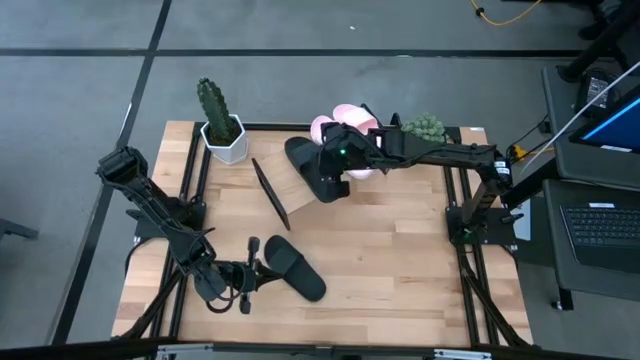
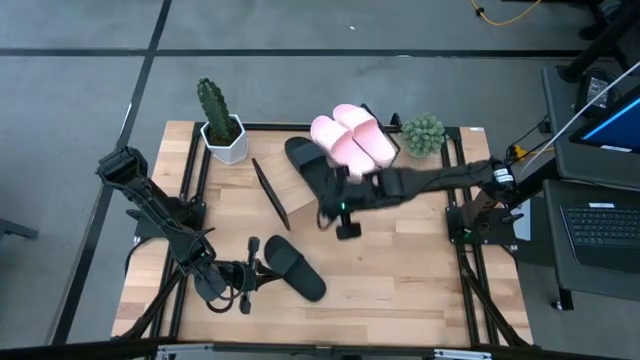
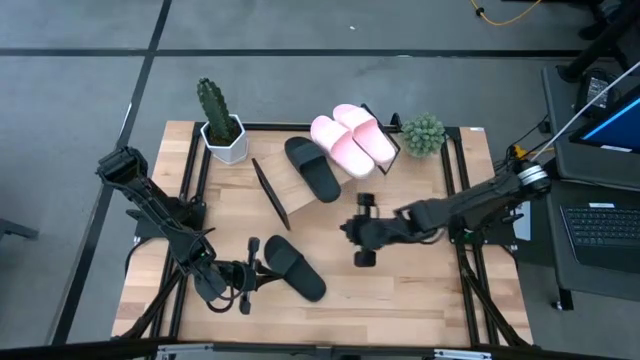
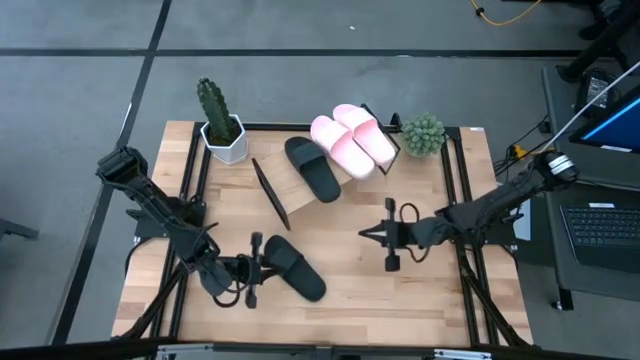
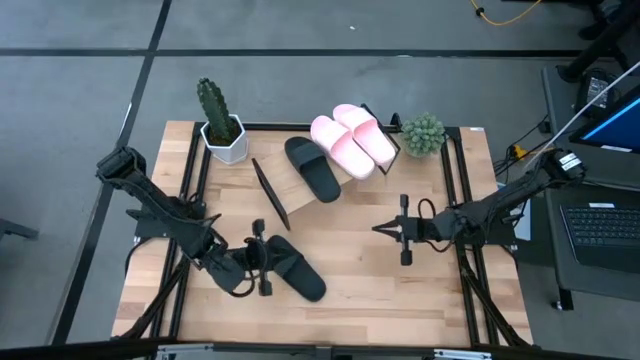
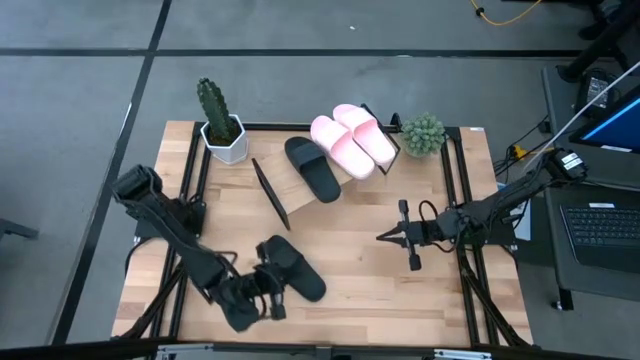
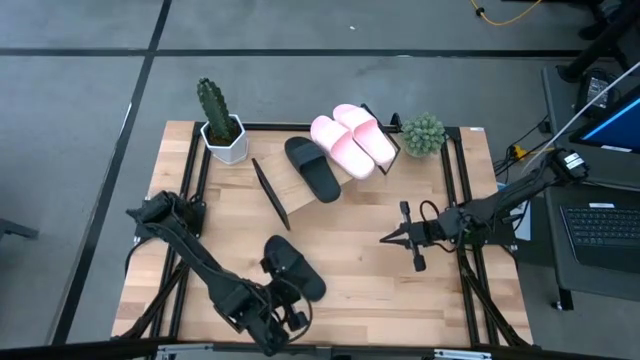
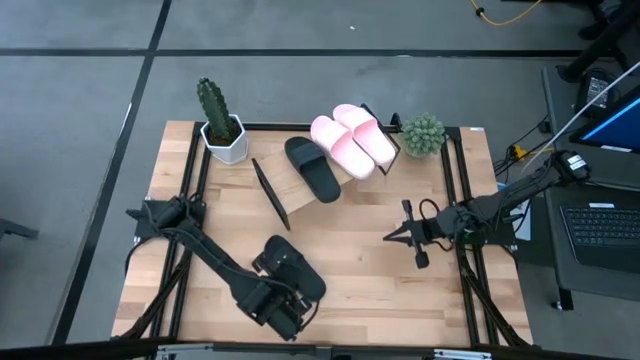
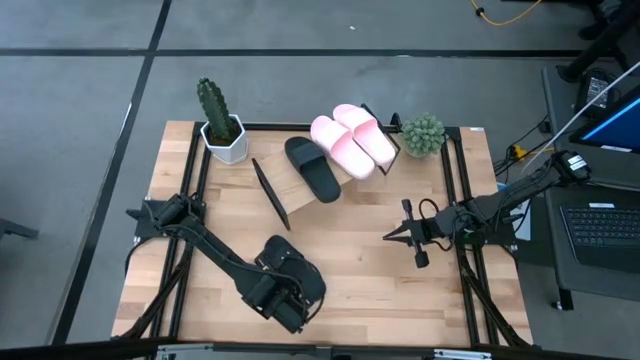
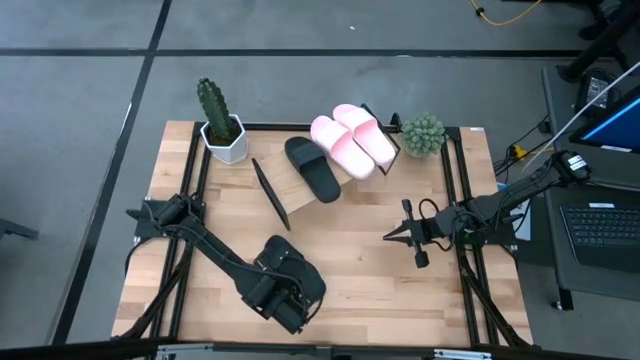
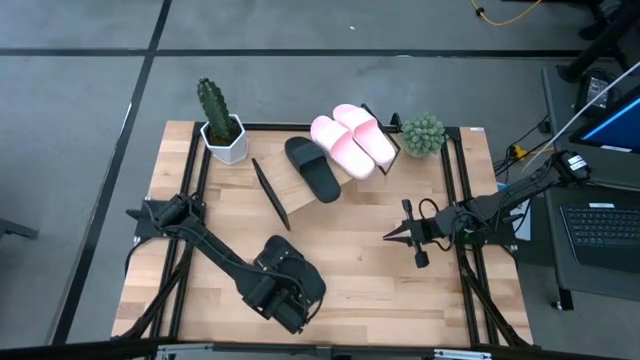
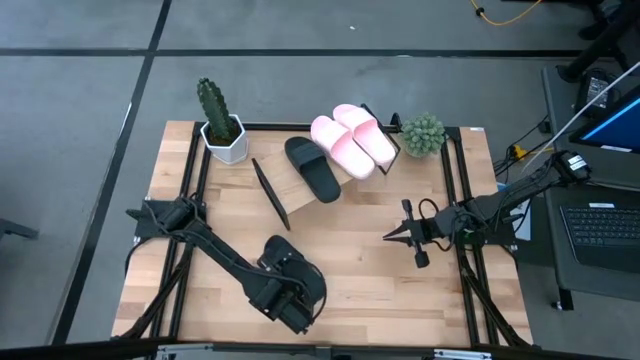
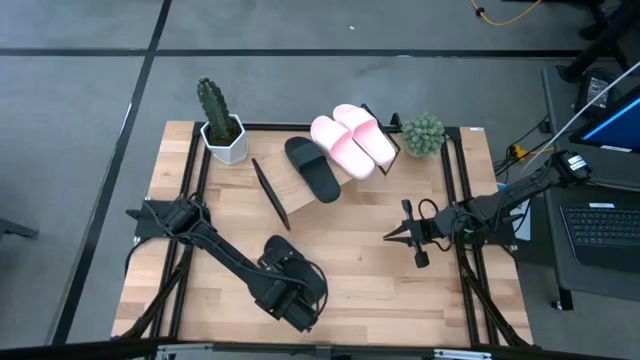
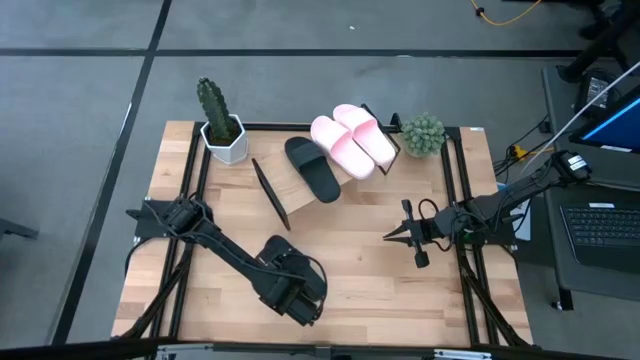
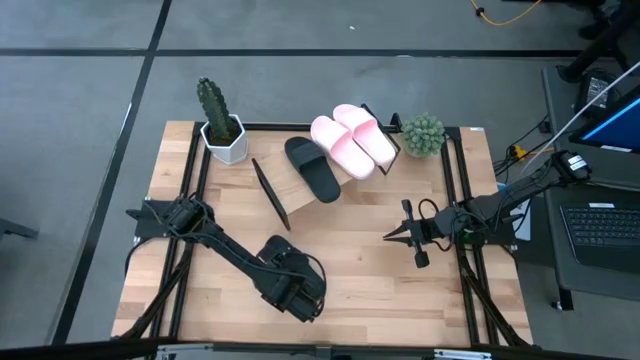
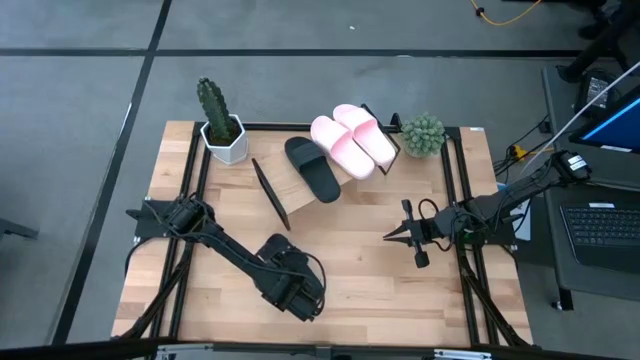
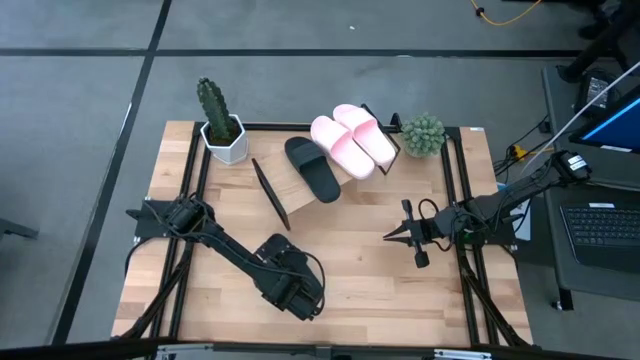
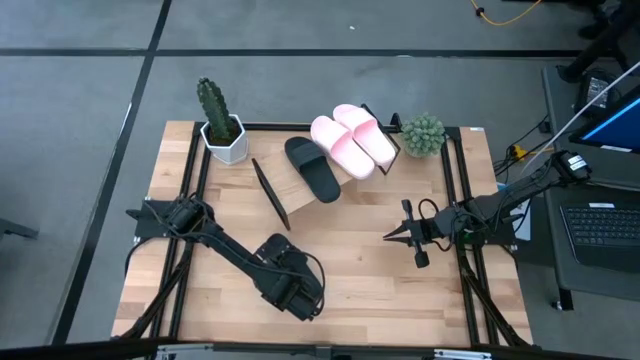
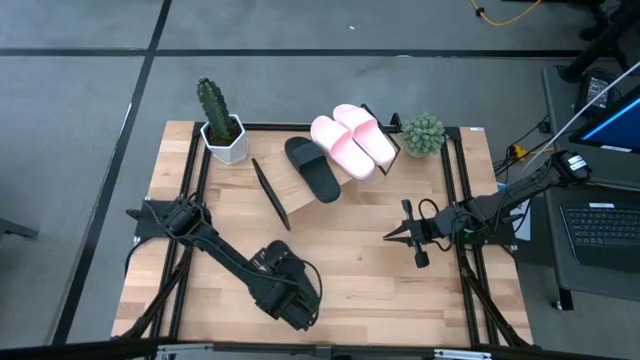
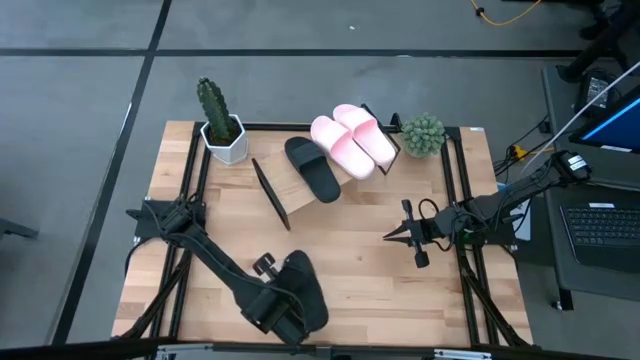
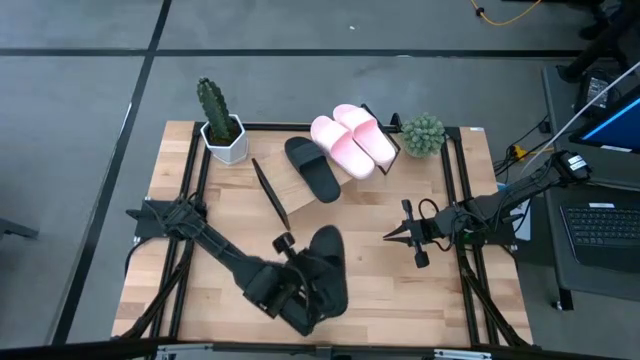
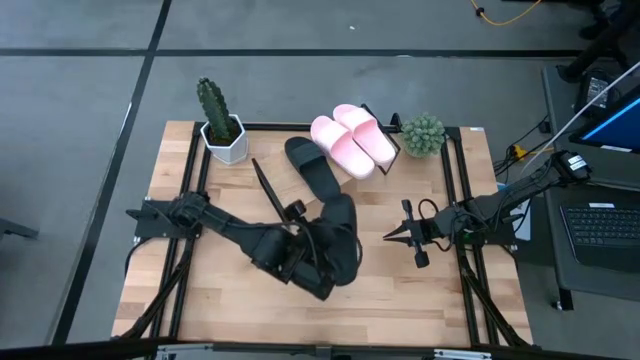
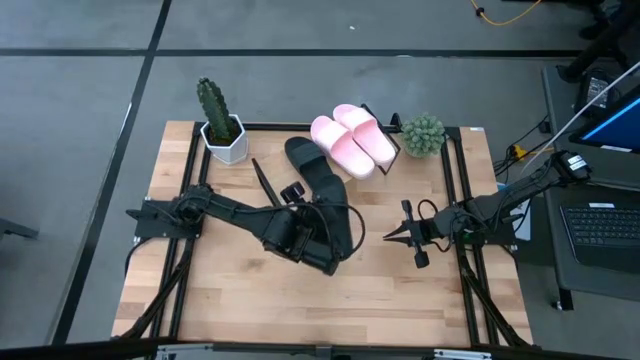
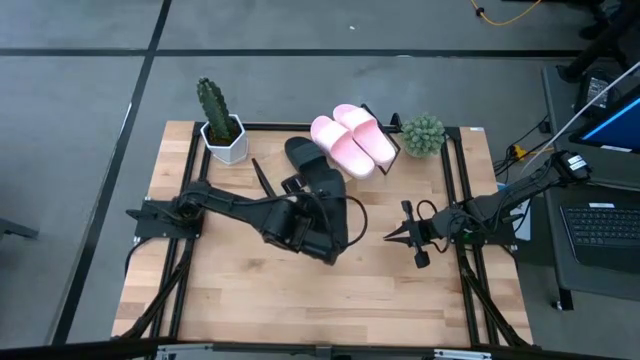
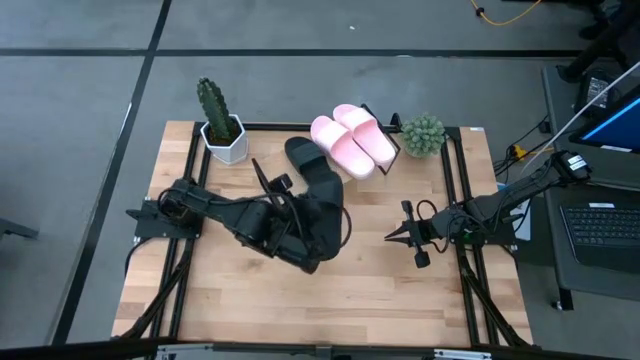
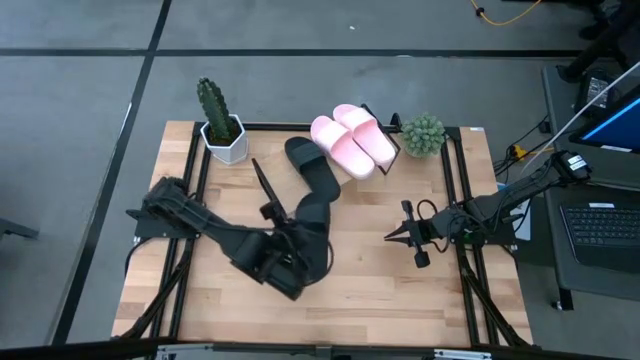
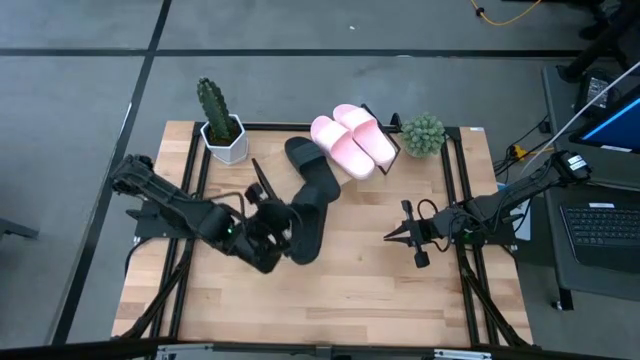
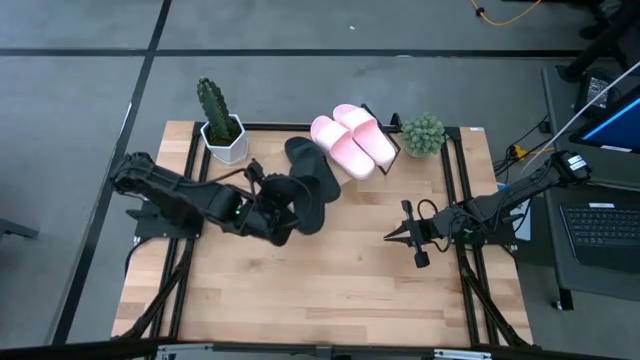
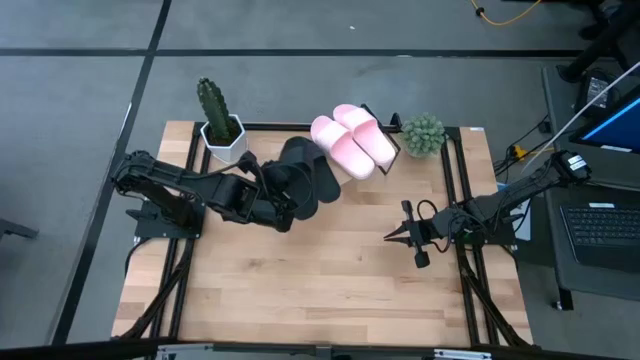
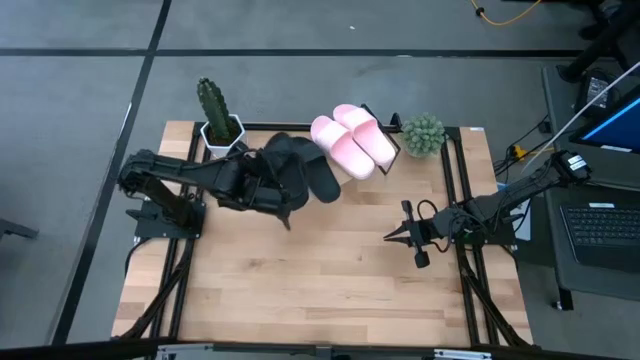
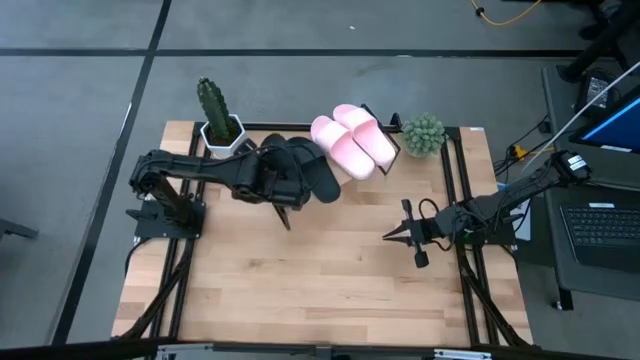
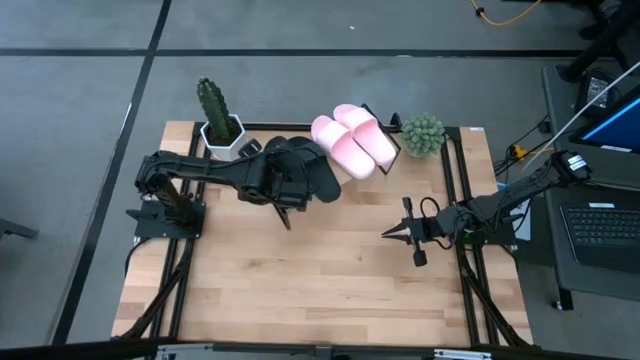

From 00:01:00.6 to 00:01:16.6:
Task: Pick and place slides into the shelf
Put the black slides on the shelf

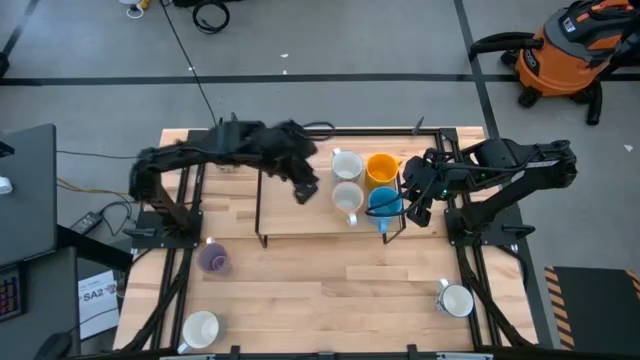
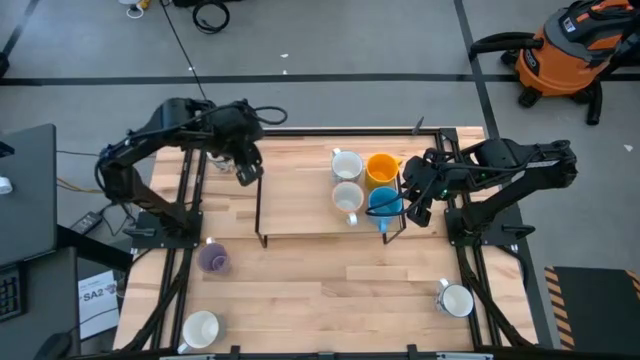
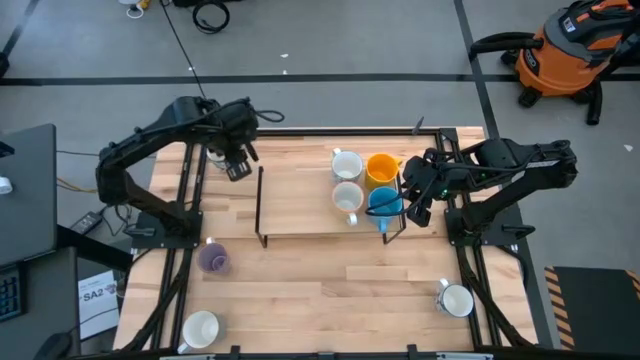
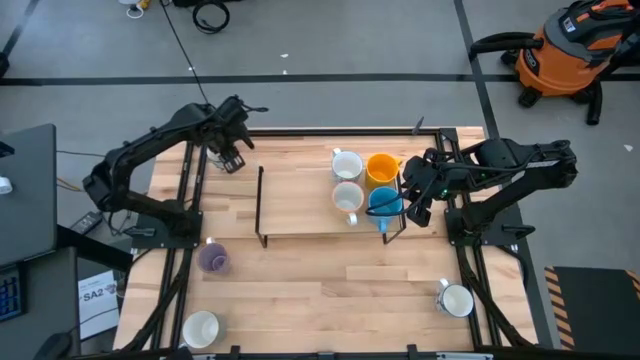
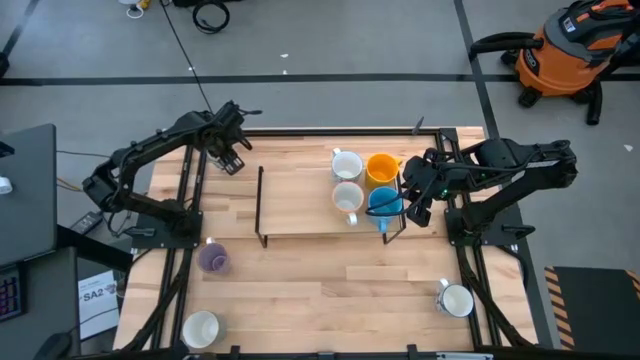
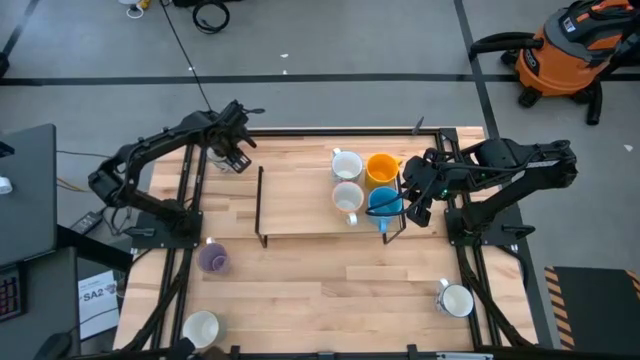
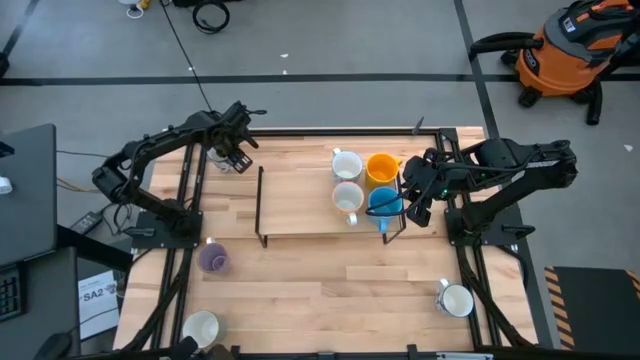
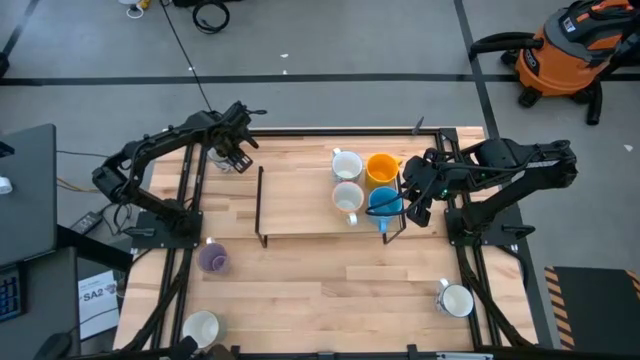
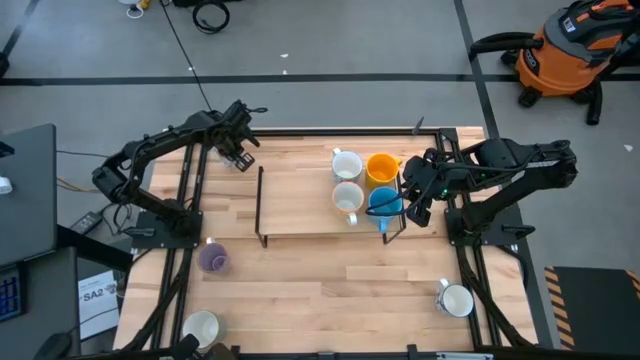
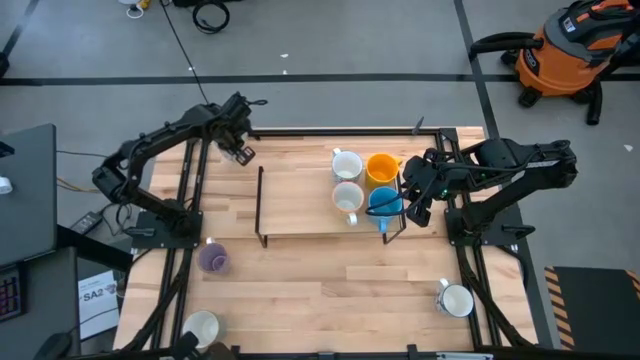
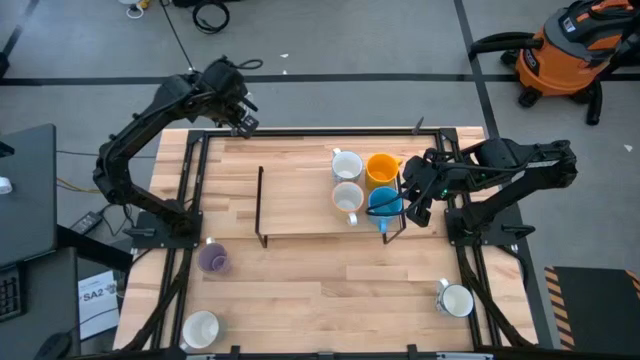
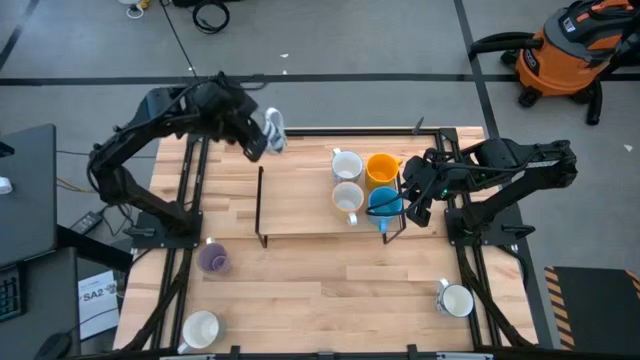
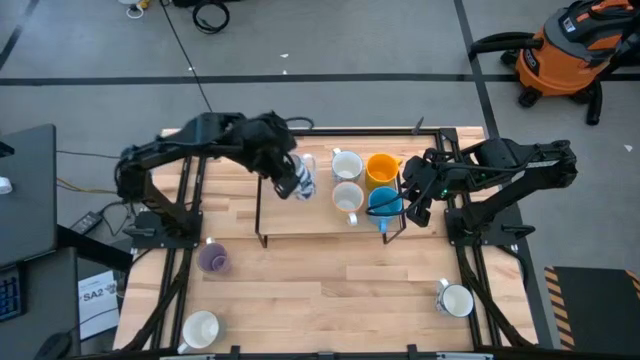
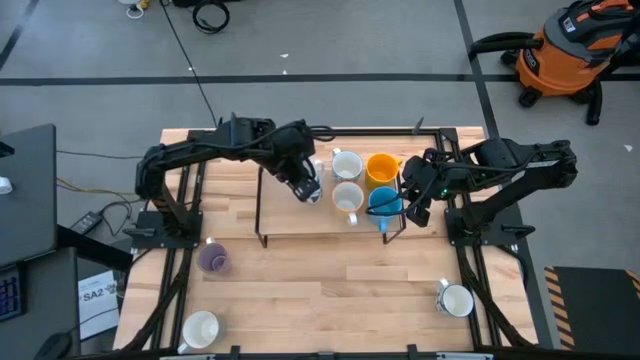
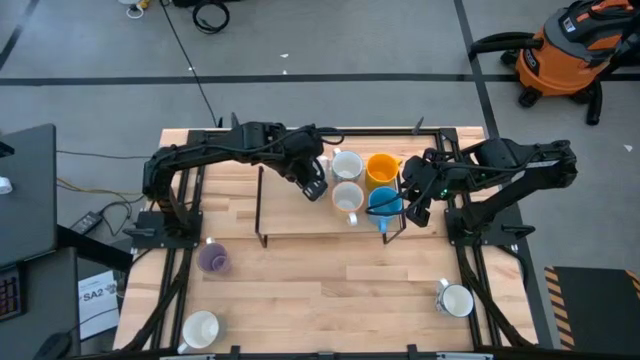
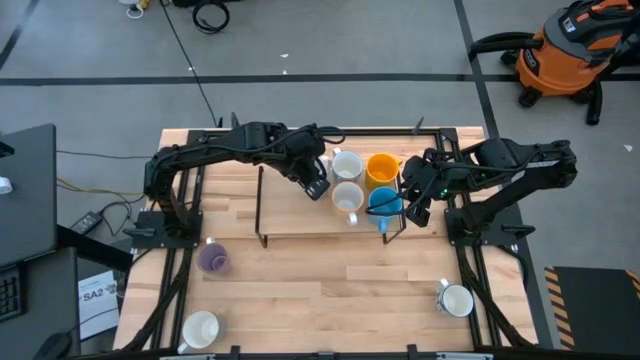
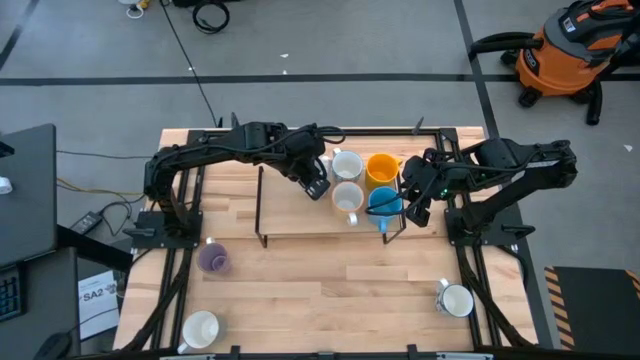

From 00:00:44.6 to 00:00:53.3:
Task: Place coffee mugs
Put the top blue patterned mug on the shelf
